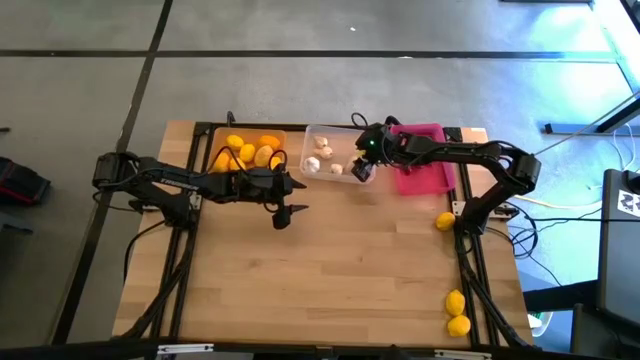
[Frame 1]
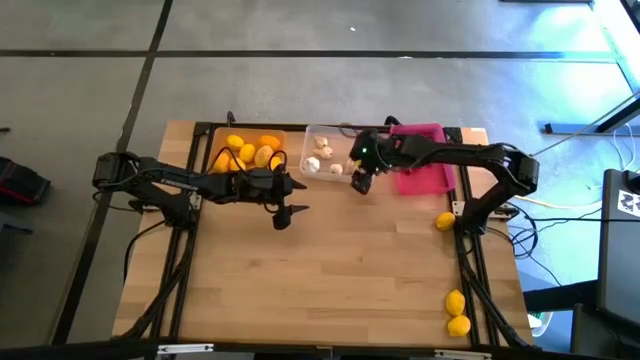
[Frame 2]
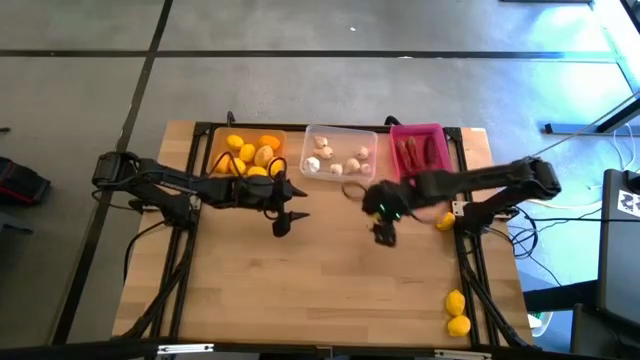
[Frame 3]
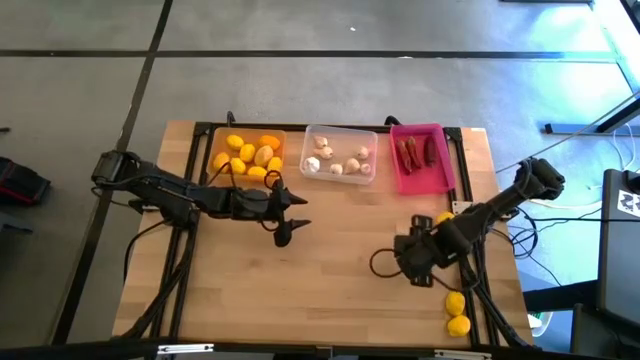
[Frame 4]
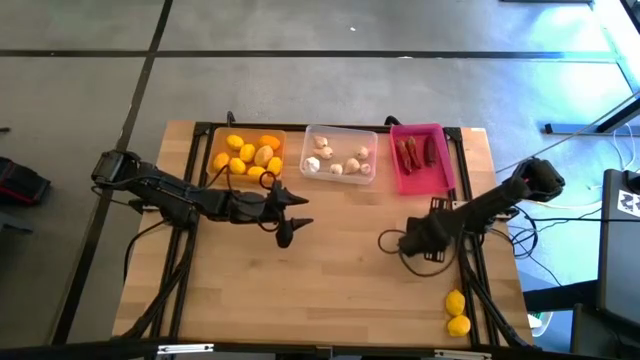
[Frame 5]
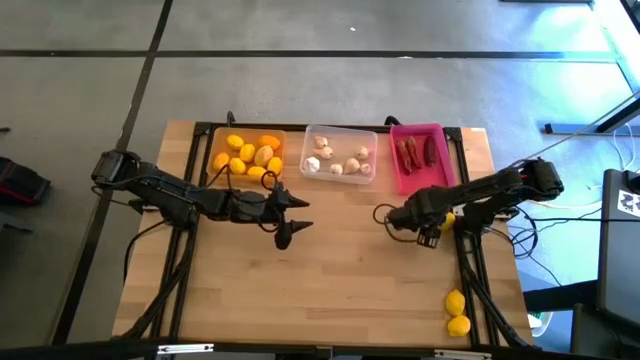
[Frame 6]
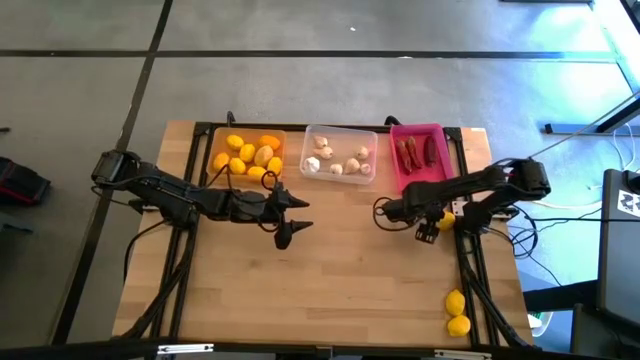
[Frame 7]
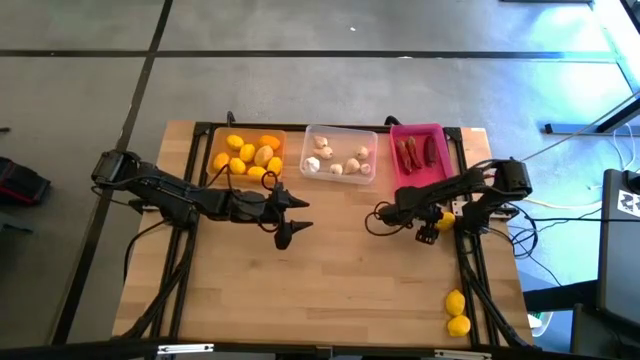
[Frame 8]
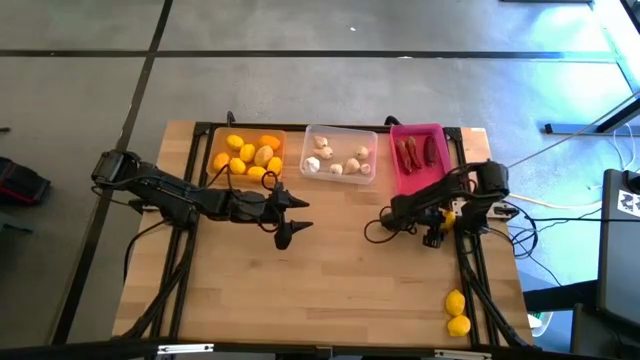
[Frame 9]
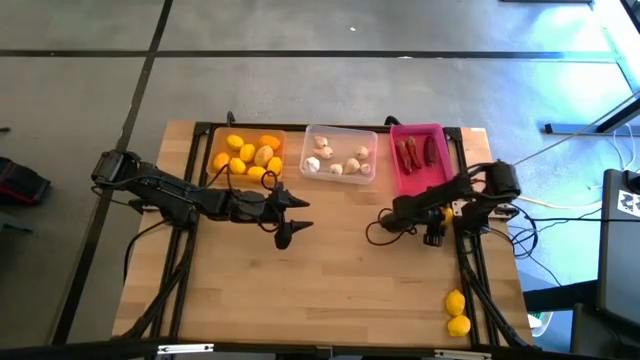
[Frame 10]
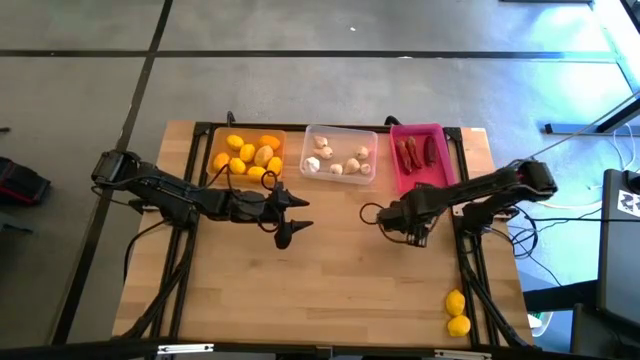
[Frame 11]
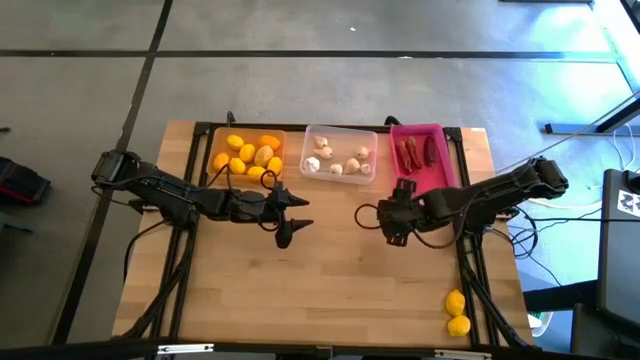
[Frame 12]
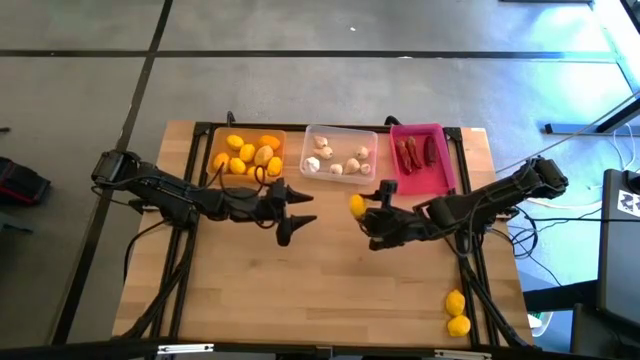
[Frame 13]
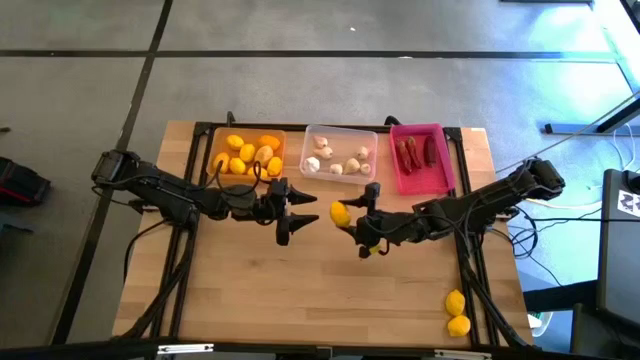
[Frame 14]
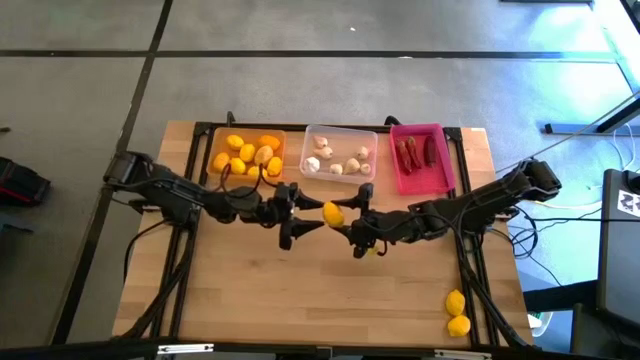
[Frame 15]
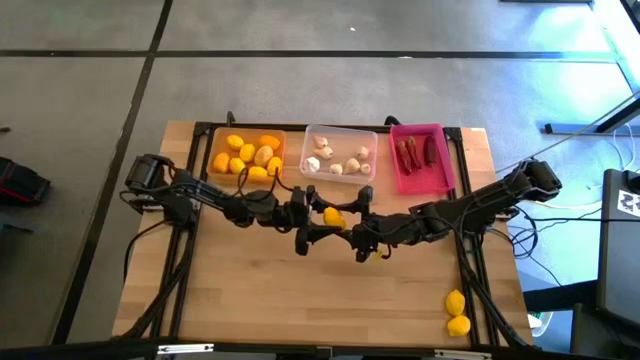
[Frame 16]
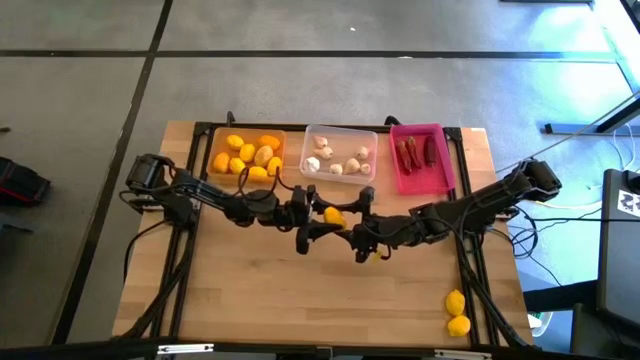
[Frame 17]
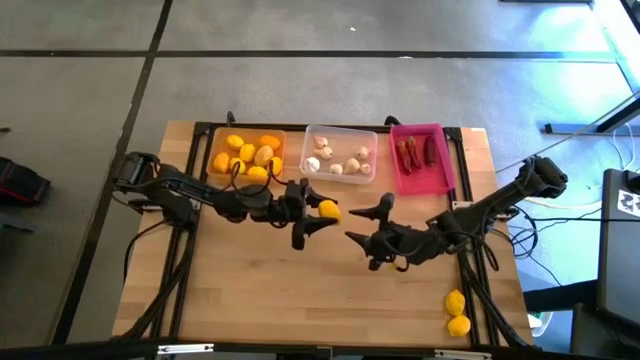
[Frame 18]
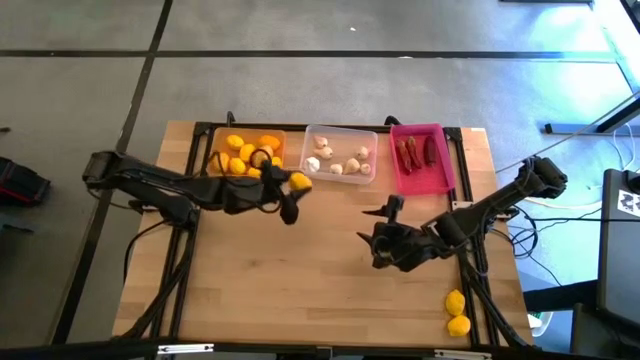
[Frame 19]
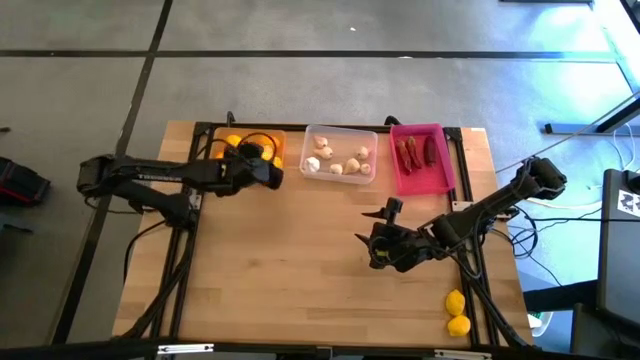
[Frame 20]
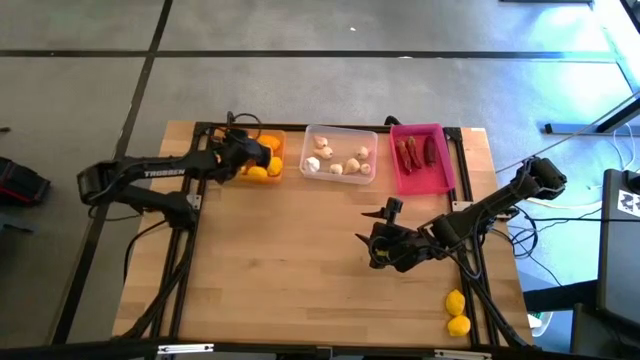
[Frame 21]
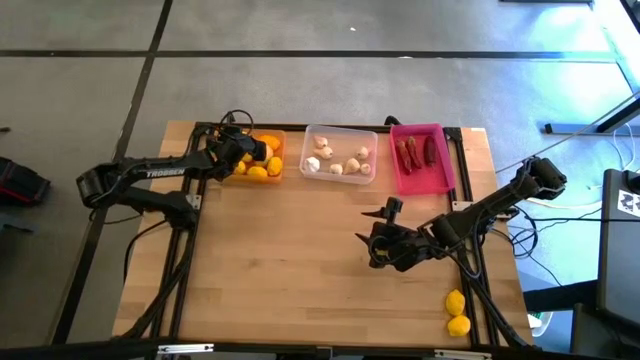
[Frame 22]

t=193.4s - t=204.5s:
Task: Sort produce into baskets
Put the yellow lemon into the orange bin

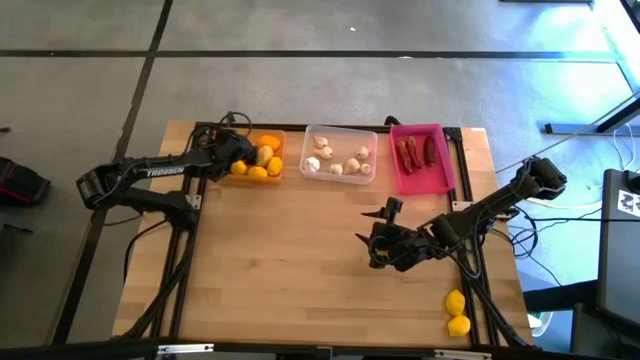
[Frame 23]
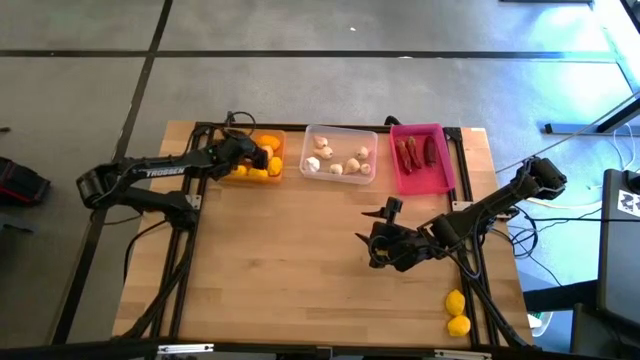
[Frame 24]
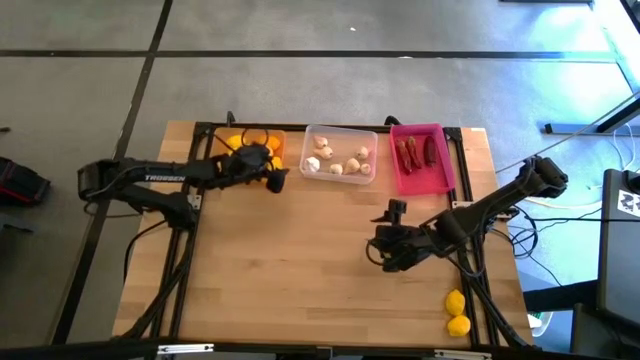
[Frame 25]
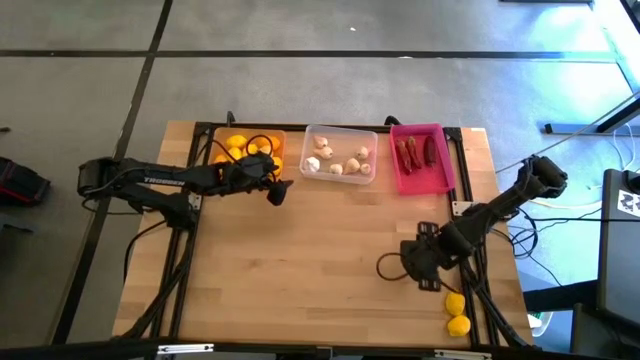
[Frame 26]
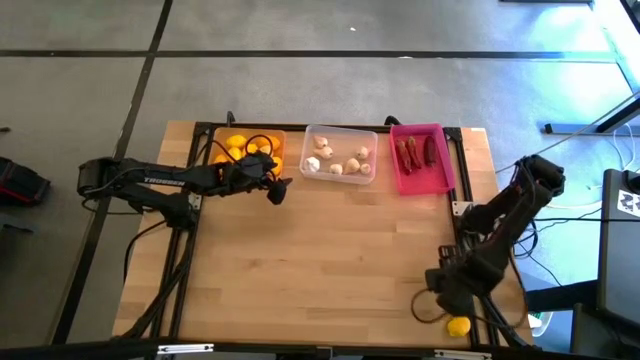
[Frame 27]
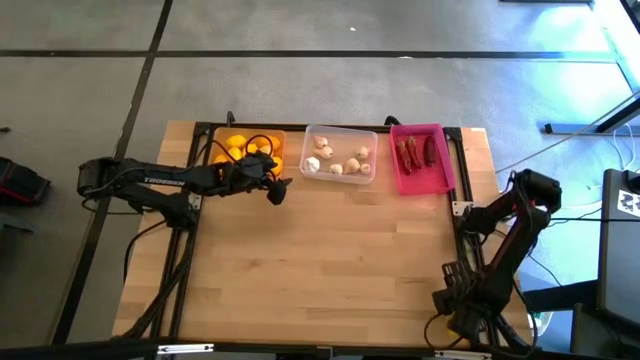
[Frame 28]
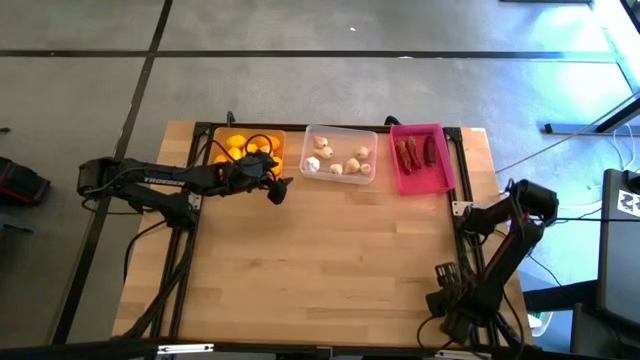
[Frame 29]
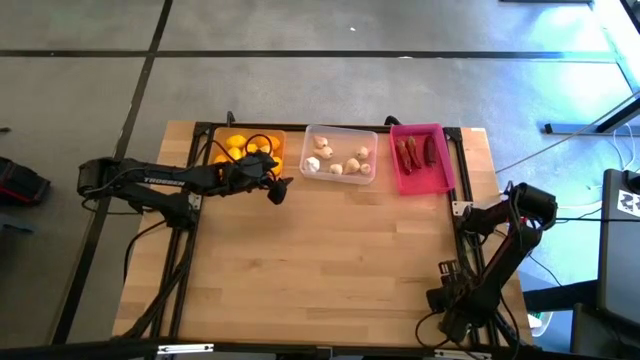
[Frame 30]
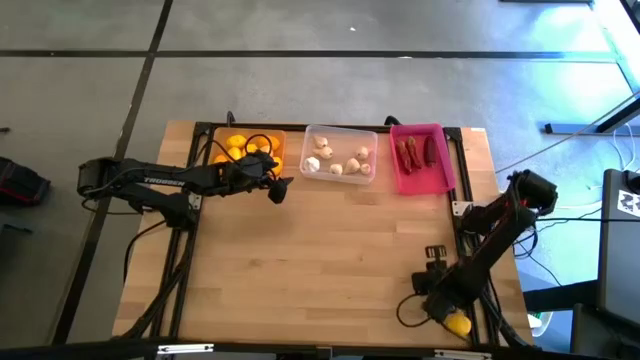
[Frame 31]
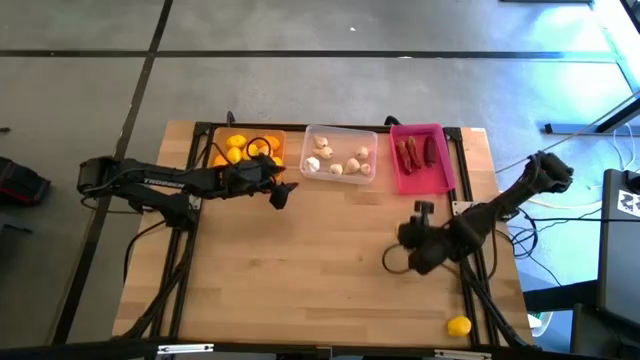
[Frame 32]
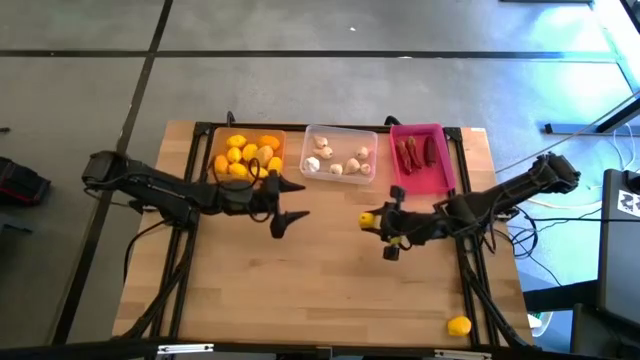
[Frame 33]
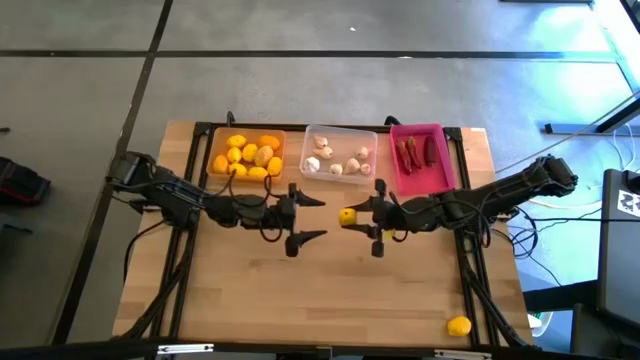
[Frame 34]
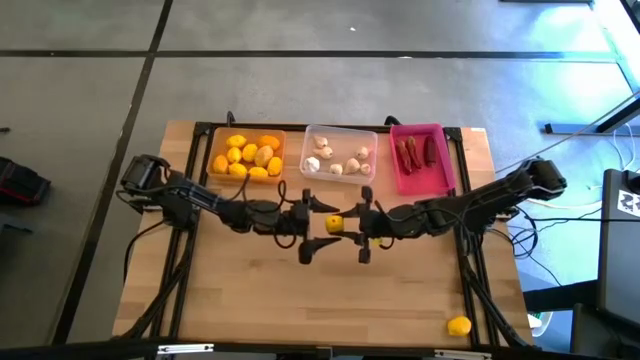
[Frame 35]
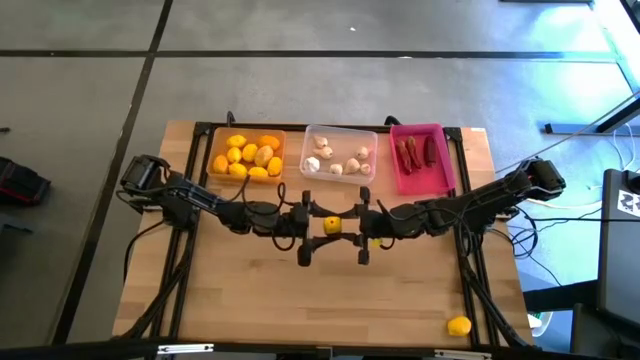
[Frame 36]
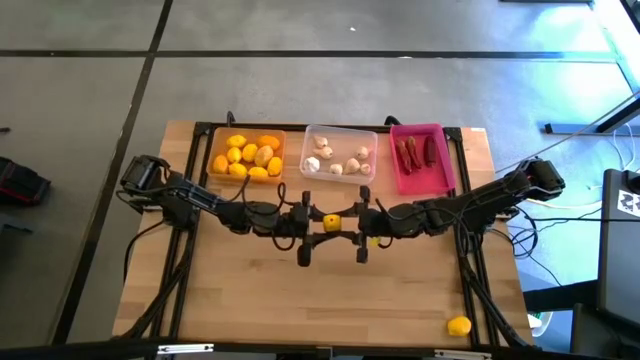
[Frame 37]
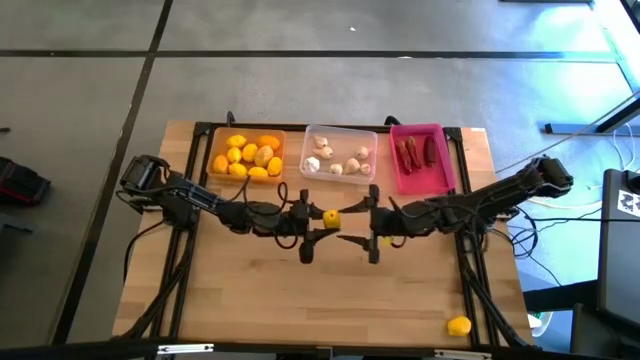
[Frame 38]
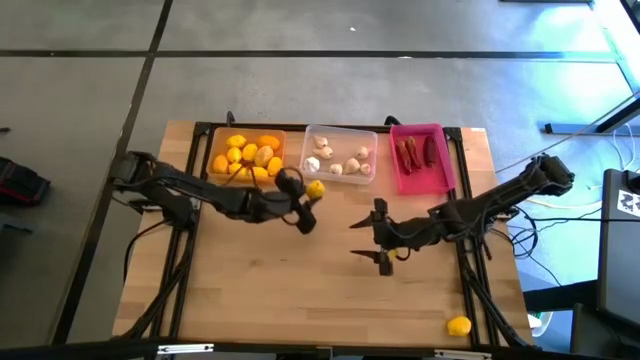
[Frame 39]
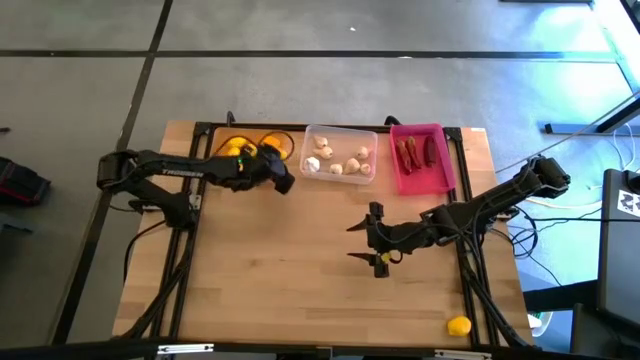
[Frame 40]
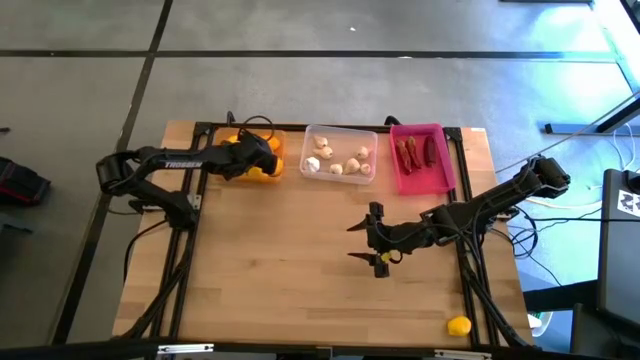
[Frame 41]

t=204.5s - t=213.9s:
Put the yellow lemon into the orange bin
